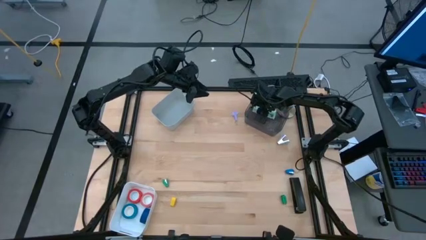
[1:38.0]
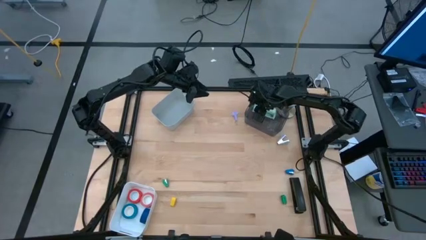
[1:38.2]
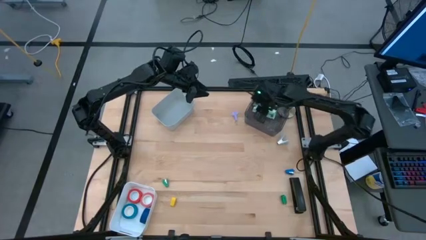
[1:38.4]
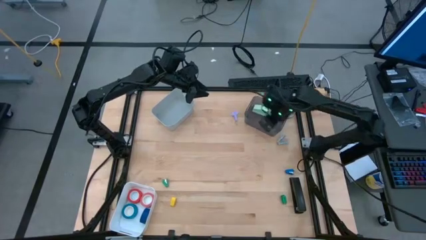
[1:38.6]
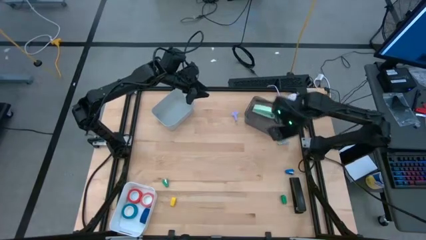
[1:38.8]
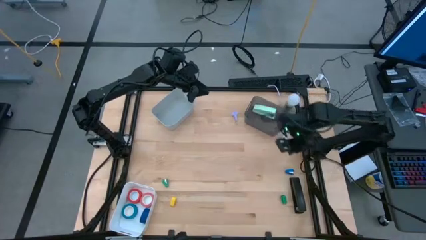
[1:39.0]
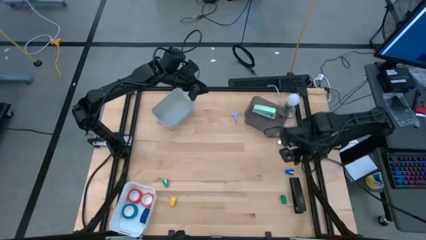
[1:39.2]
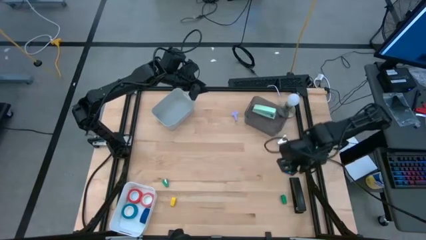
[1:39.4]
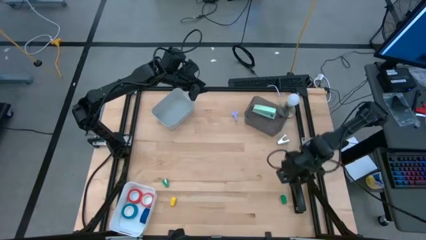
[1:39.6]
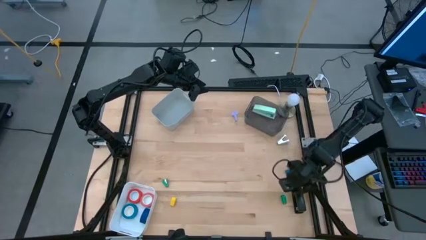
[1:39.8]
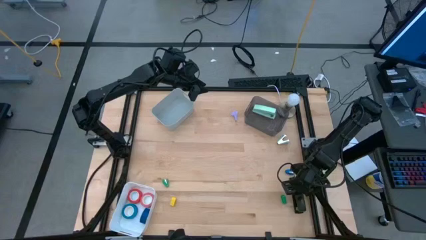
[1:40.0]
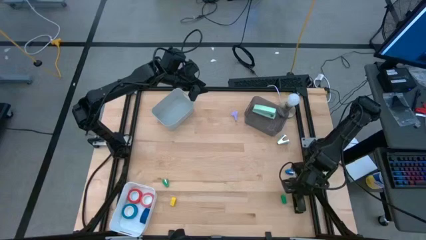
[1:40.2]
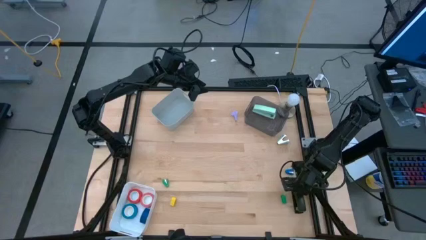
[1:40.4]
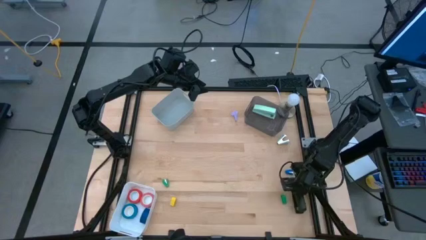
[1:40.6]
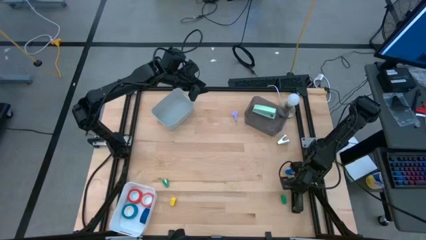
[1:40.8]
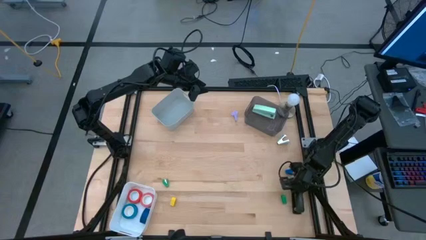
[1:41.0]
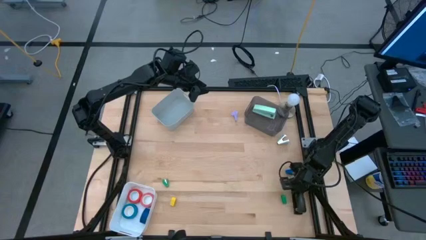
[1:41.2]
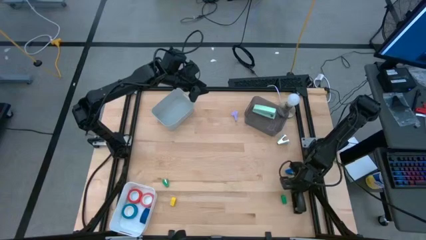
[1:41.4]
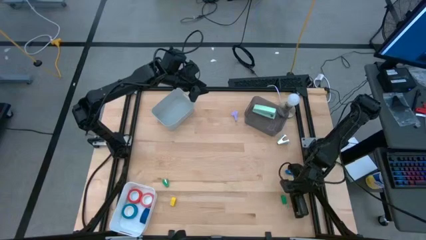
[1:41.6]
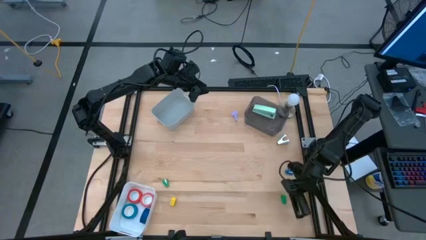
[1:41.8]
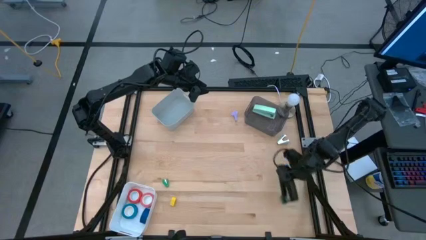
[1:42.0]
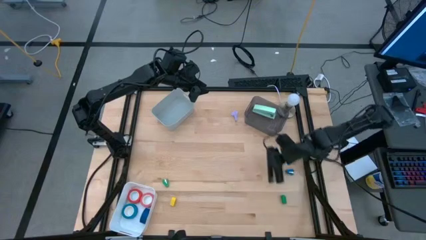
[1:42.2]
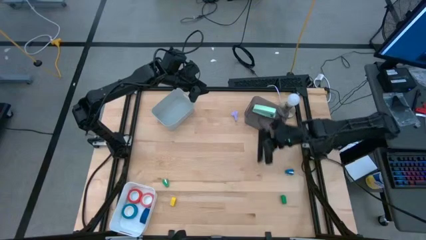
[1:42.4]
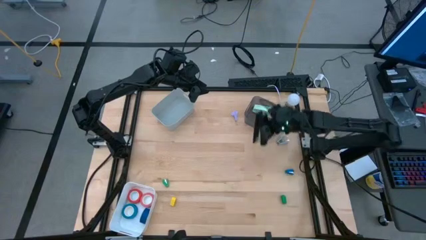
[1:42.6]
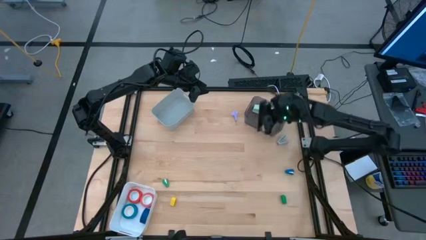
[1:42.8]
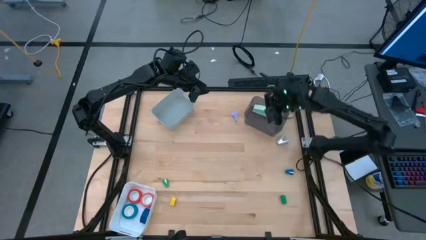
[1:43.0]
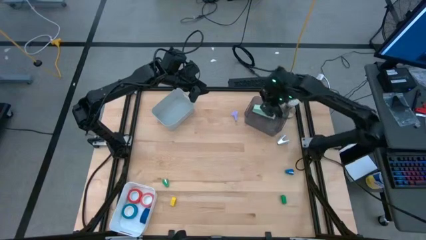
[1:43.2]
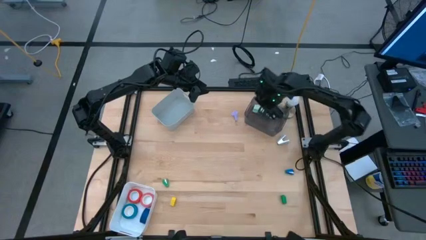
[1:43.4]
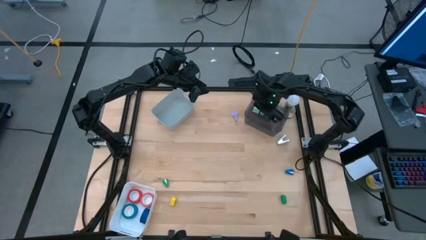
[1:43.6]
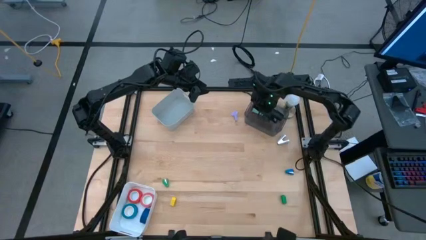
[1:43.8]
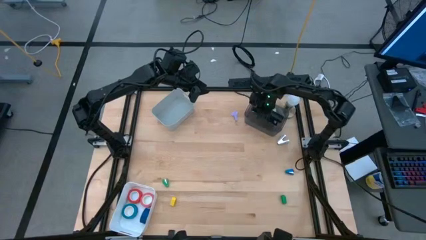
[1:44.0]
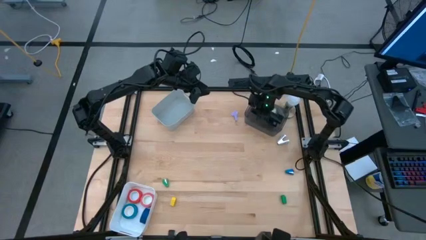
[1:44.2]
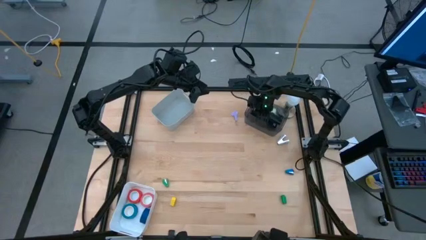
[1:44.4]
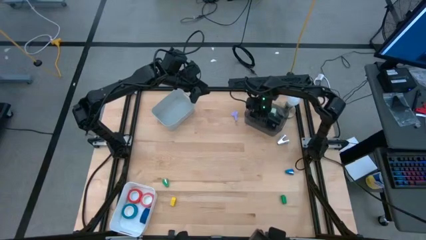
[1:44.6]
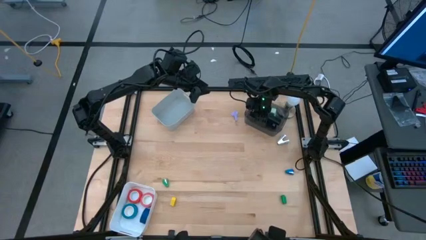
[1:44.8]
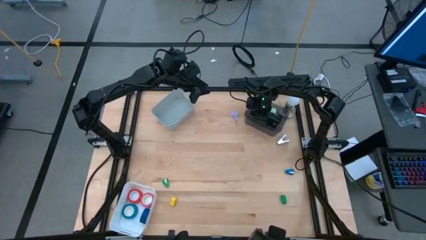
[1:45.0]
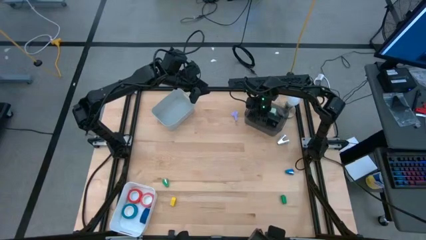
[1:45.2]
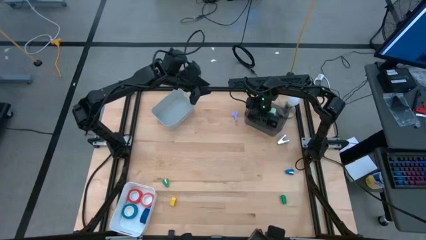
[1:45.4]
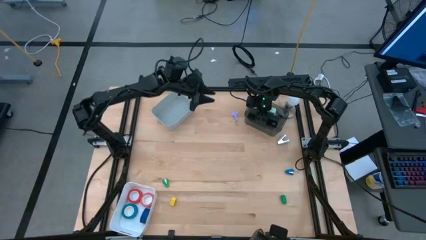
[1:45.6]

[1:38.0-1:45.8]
Task: Pick and place Stapler, Stapler remover, tape
Put the big black stapler into the black bin

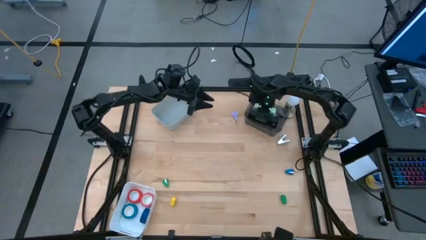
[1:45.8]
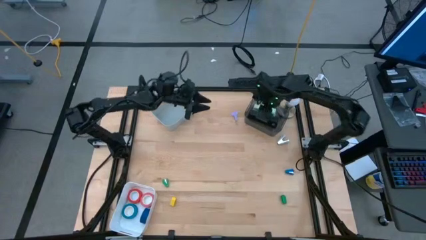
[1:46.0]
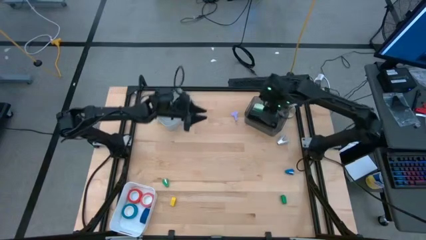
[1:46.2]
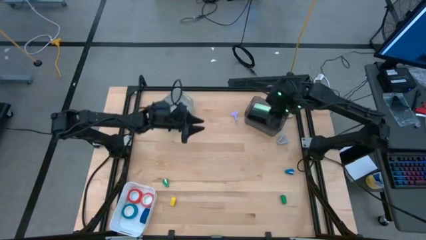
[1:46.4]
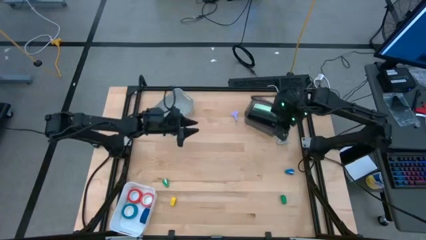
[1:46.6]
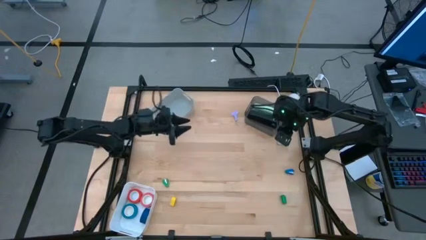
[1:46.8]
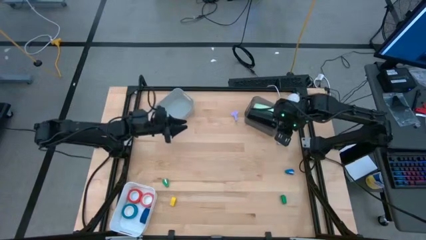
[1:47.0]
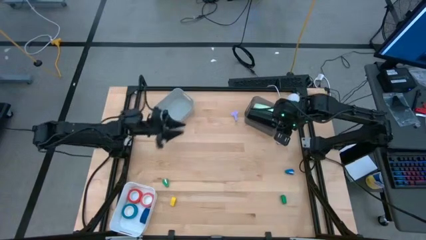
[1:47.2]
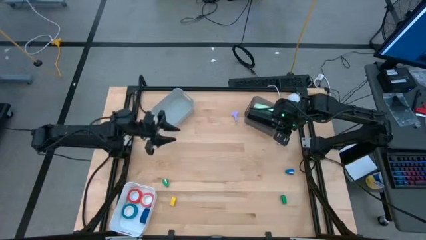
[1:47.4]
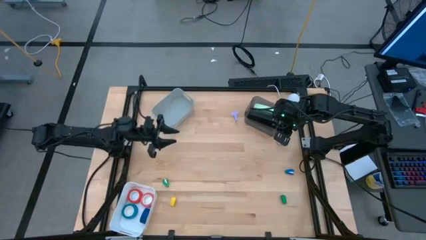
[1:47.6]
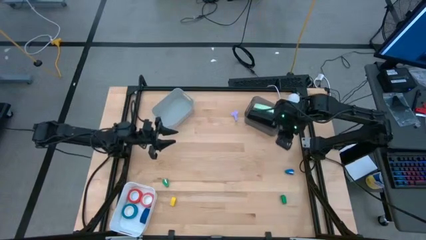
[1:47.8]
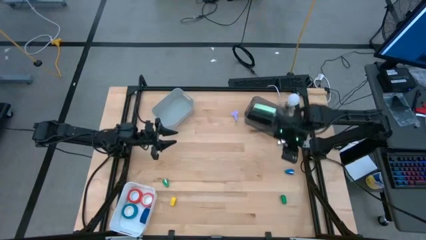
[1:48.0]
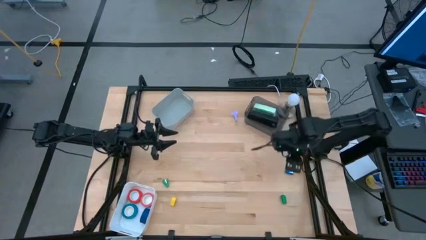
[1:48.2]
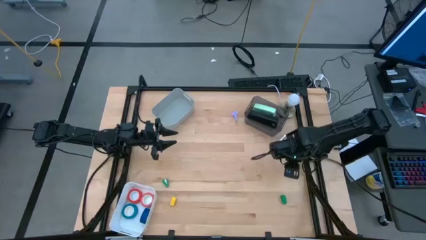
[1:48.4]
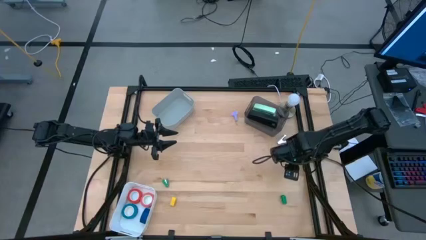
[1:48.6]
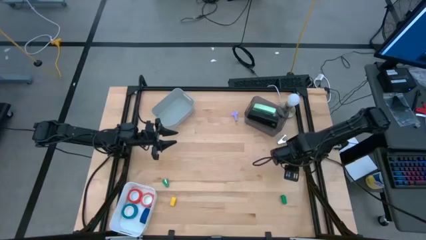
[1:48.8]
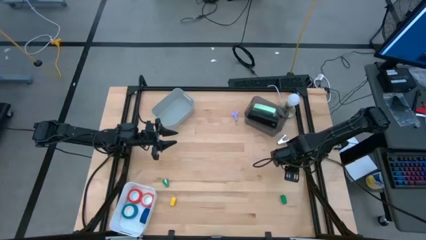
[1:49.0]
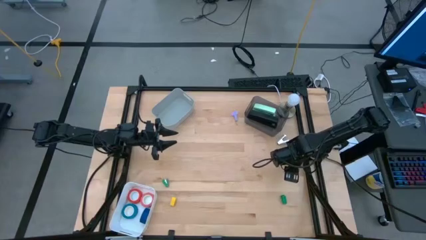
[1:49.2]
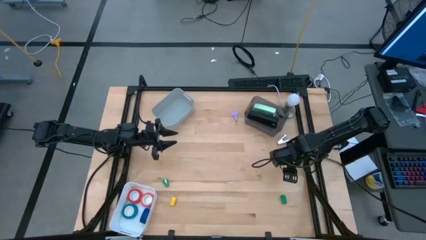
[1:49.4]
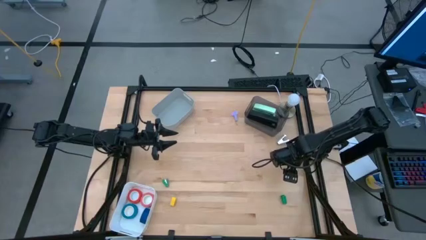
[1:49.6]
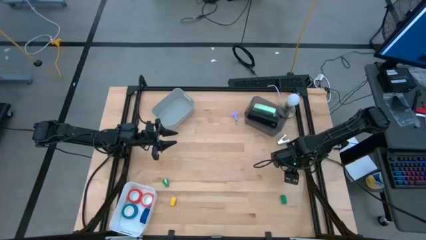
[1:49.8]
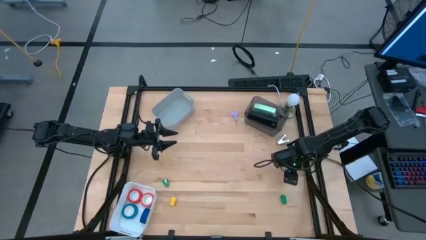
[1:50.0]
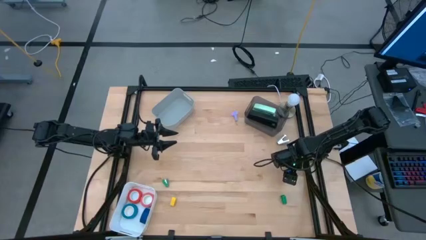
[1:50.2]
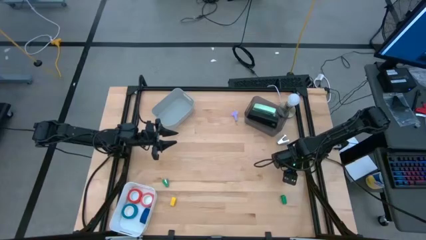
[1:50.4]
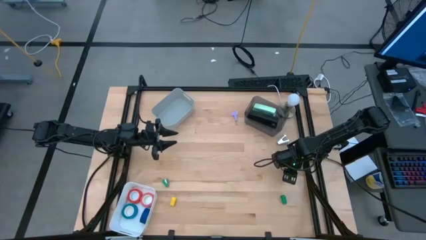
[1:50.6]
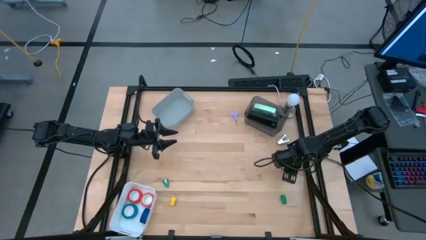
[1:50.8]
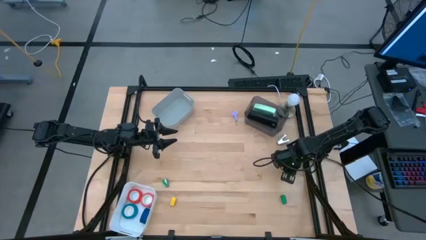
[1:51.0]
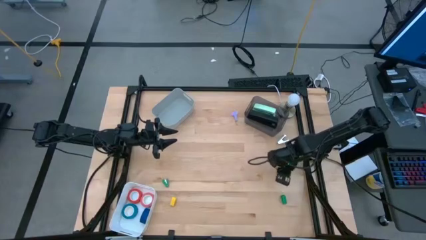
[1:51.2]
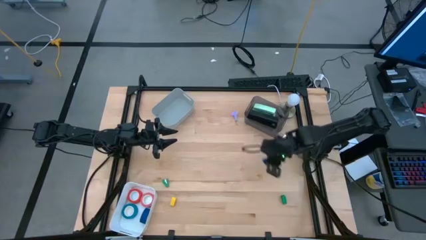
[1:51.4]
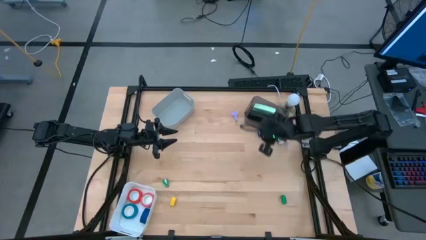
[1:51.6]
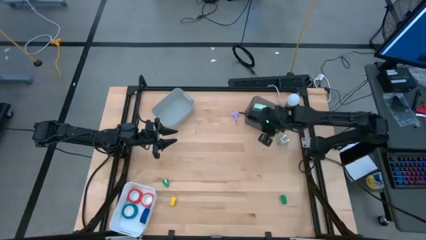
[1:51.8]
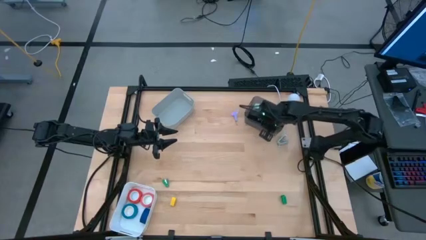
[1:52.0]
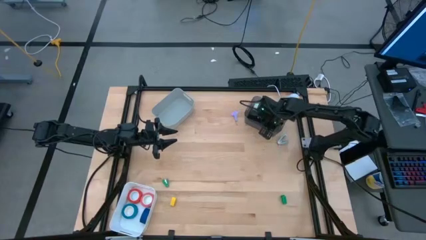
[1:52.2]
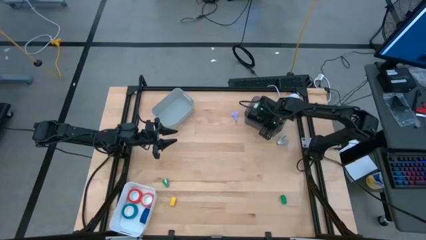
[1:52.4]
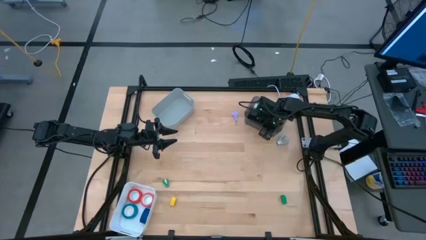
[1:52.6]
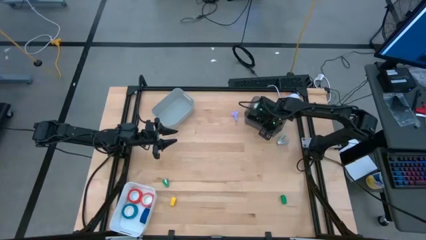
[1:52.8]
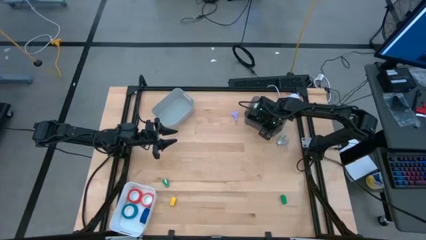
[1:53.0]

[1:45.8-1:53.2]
Put the small blue stapler into the black bin
